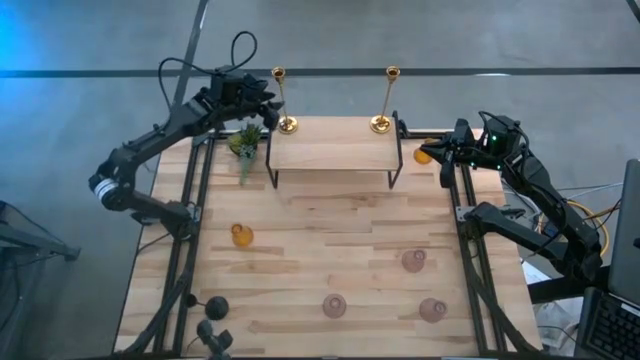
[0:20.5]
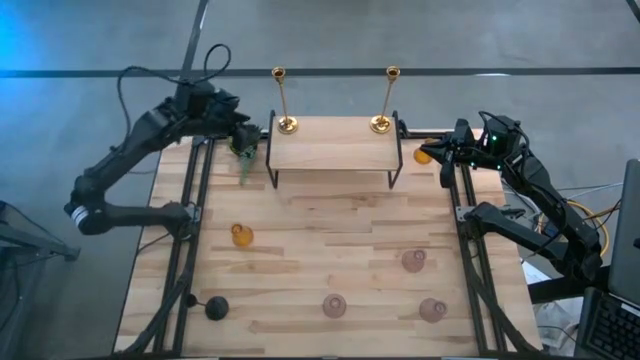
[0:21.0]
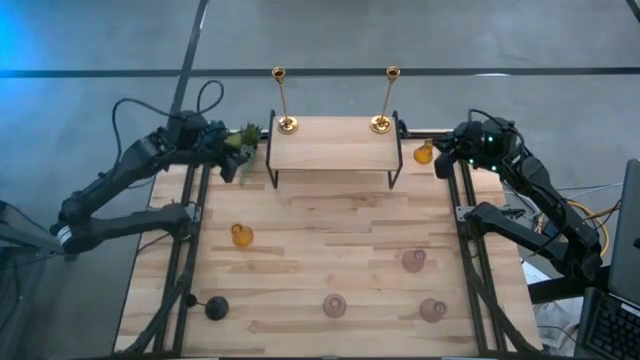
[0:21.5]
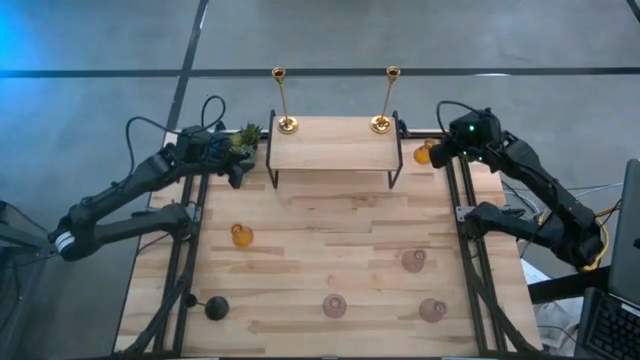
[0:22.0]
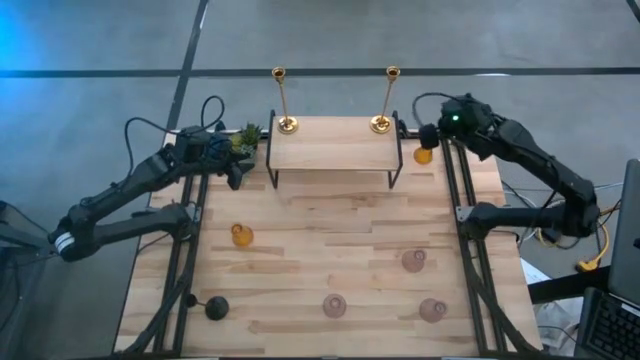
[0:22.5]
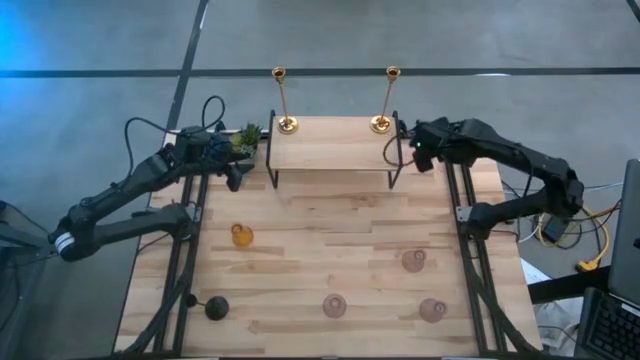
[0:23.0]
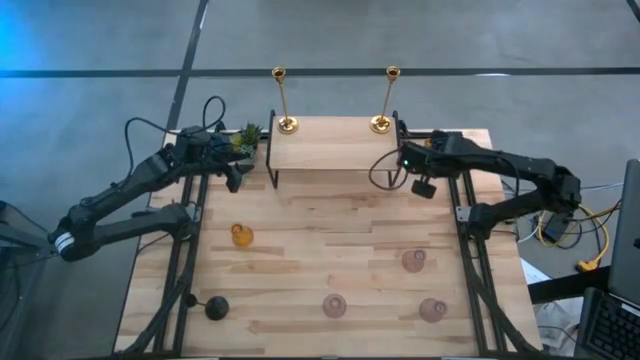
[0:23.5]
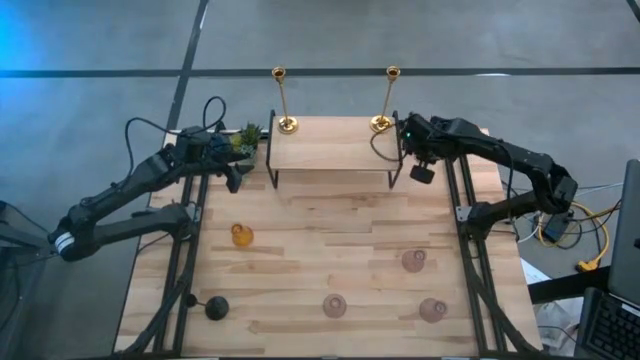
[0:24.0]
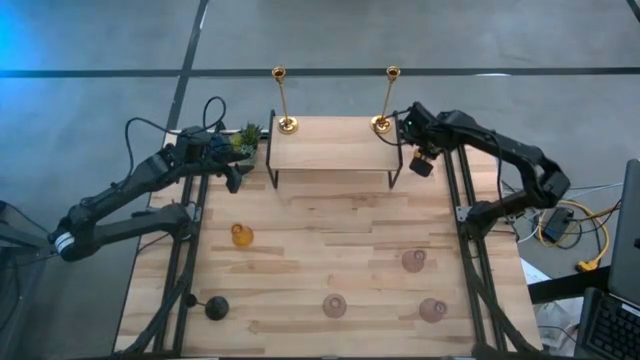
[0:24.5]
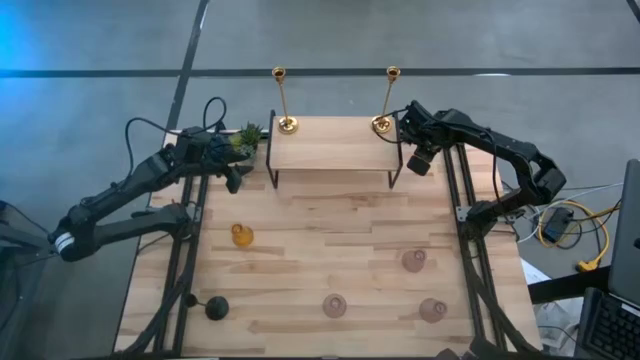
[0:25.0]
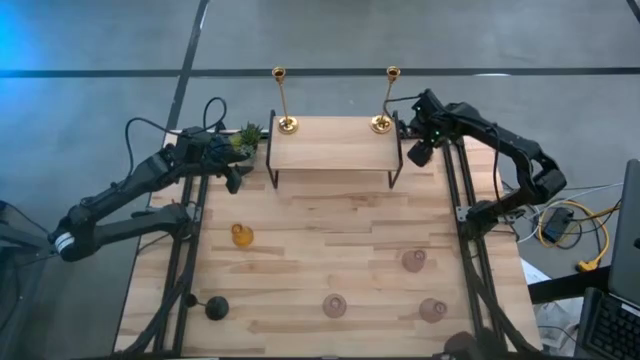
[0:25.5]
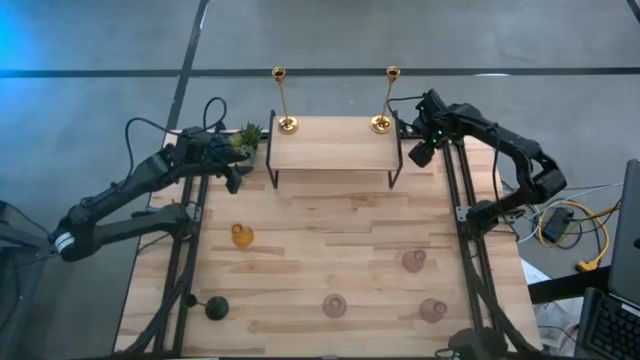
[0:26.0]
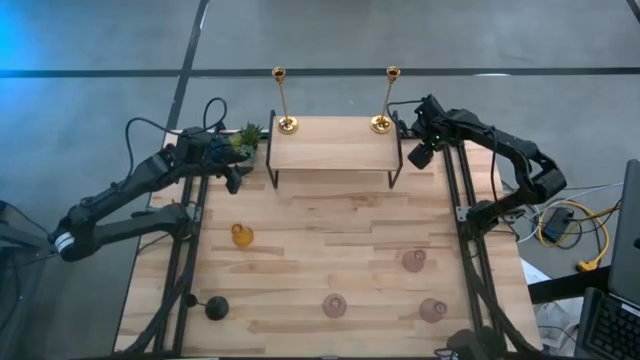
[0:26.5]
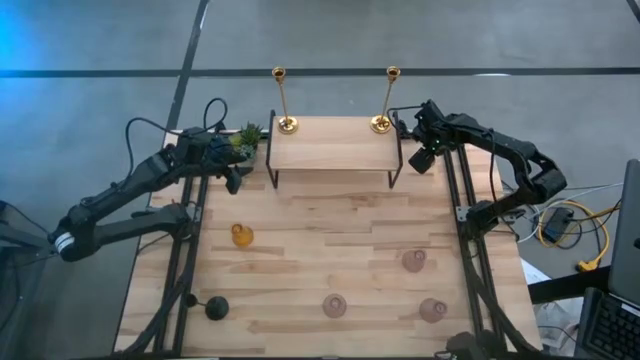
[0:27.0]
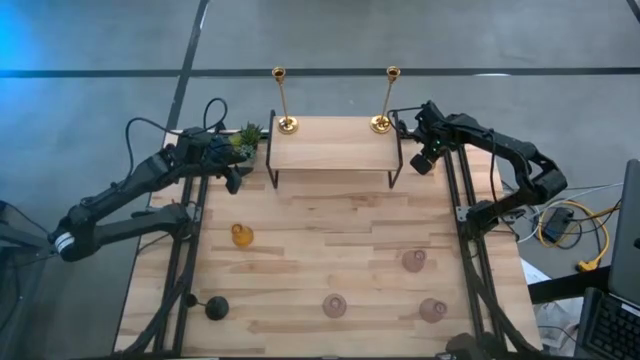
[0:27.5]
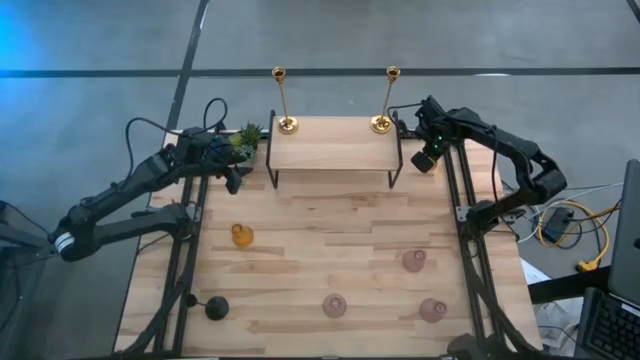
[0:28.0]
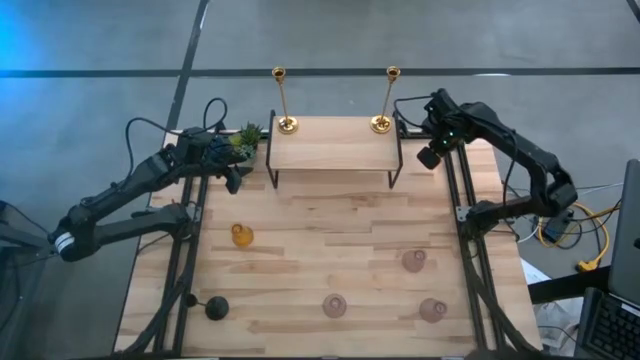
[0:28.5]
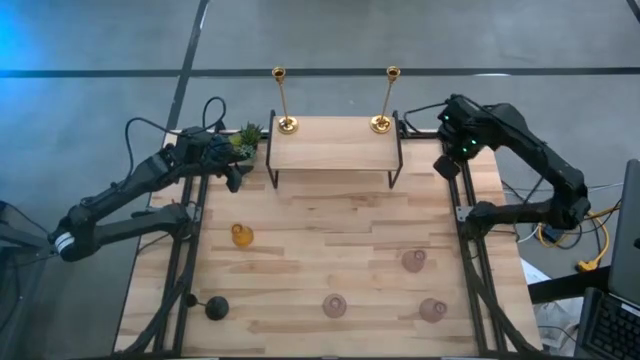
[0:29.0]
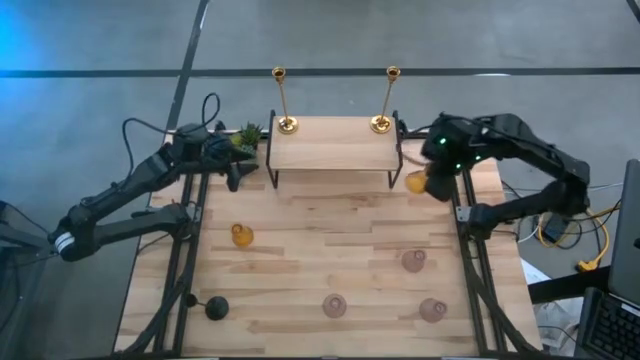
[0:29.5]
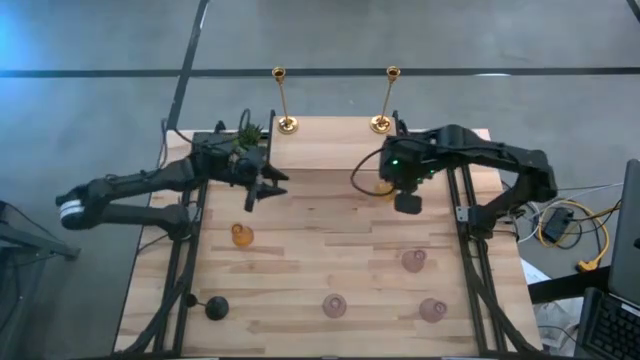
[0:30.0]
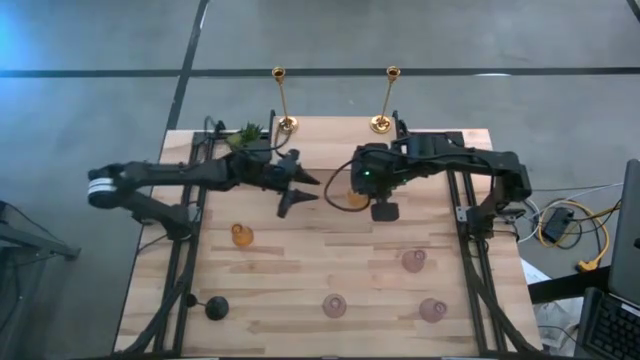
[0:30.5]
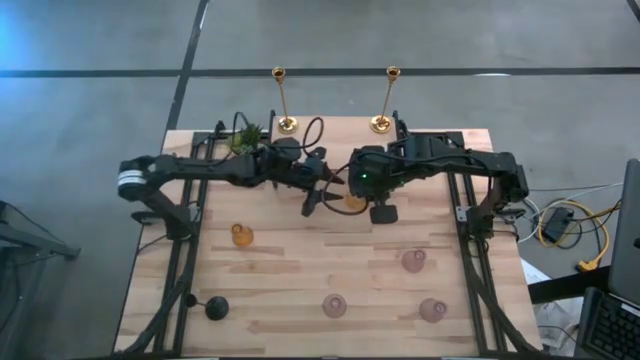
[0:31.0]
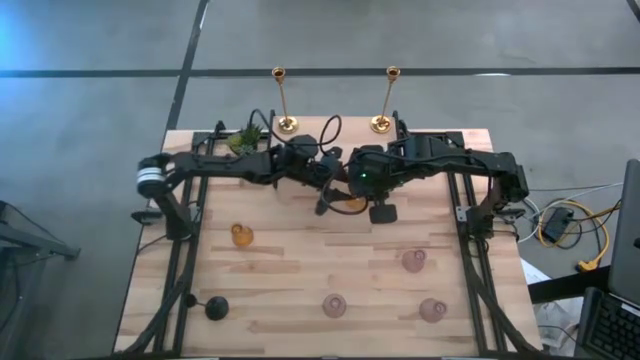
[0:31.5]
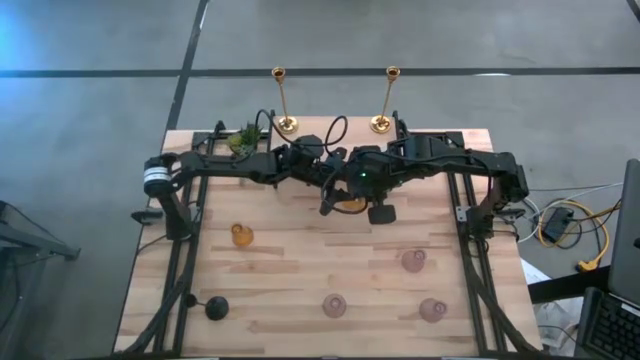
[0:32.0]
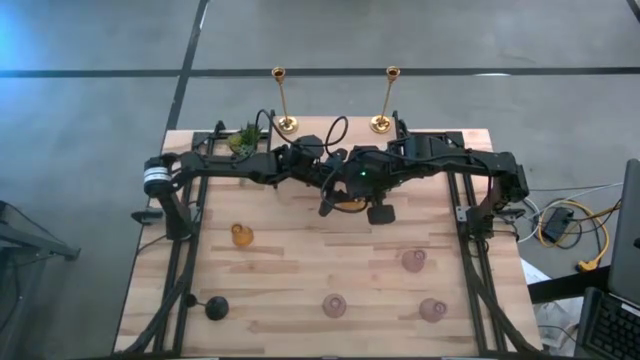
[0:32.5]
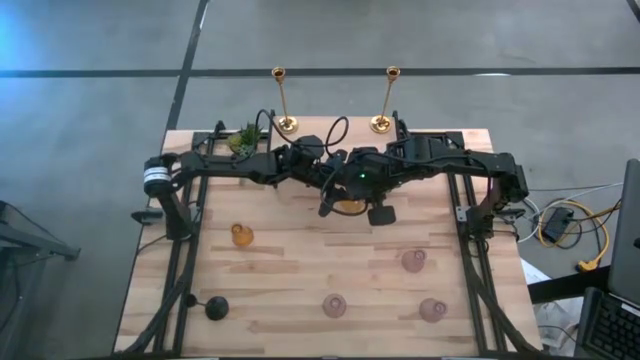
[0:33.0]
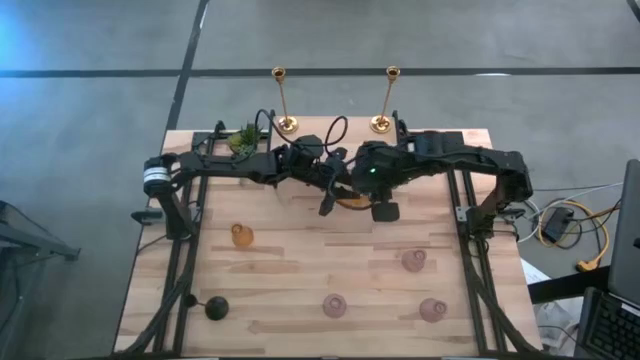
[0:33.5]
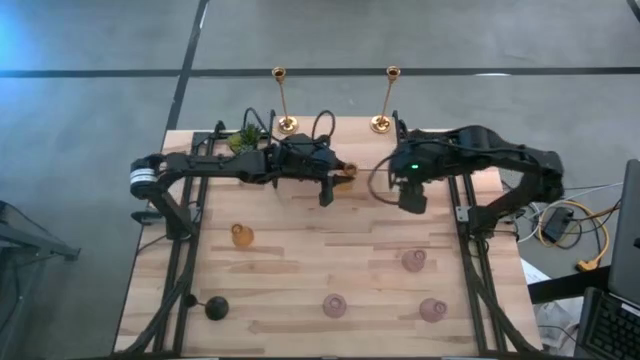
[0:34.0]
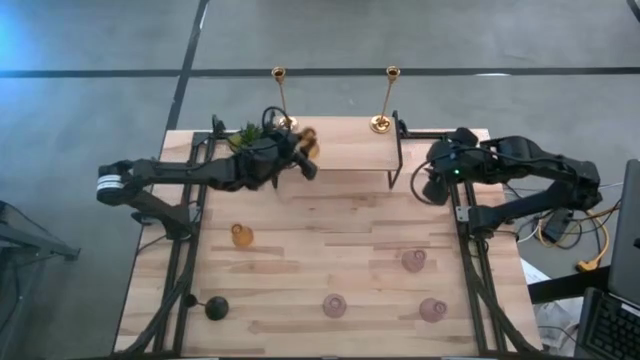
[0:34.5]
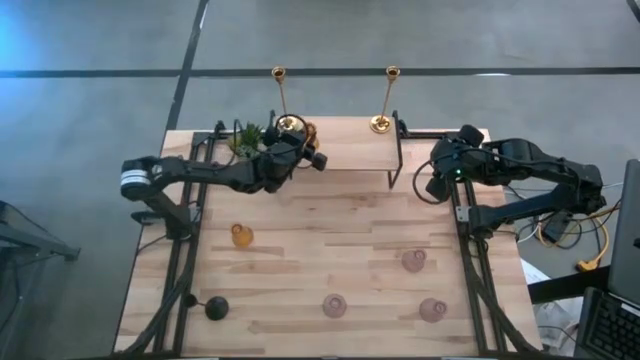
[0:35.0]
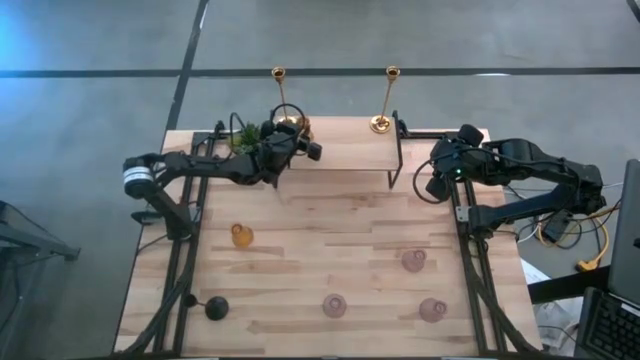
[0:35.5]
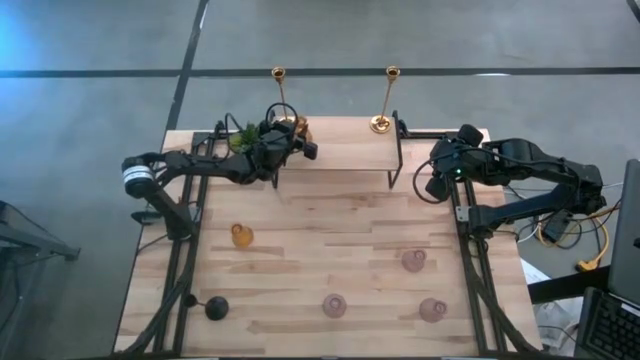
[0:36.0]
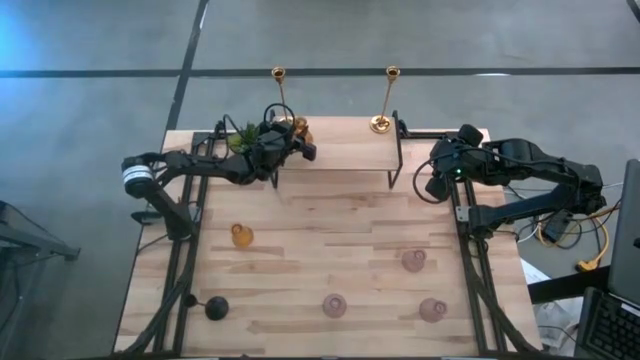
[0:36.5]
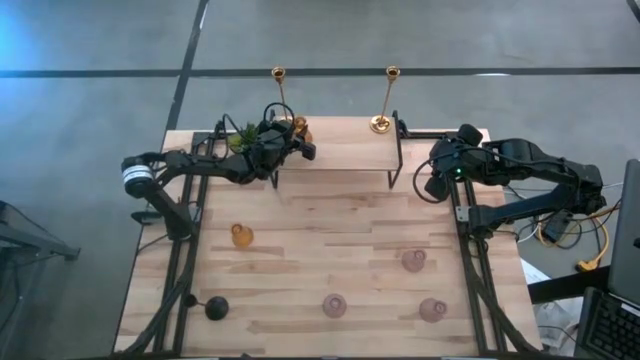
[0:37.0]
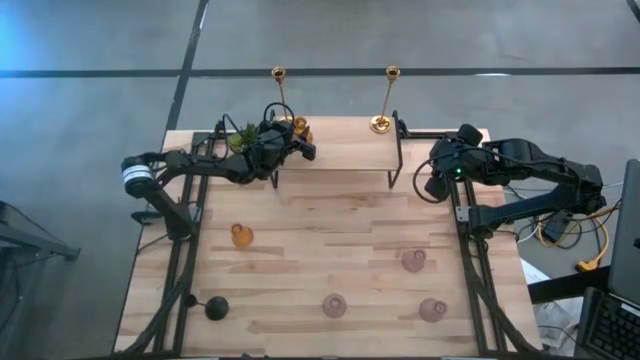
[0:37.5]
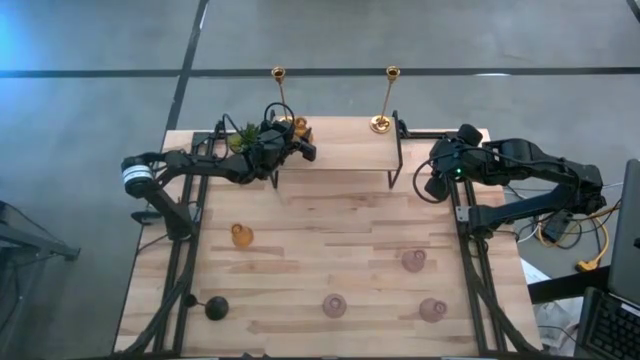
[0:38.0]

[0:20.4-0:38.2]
Task: Pick & Place candle stick holders
Put the top orange glass candle holder on the shelf
